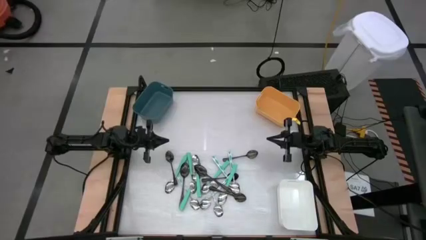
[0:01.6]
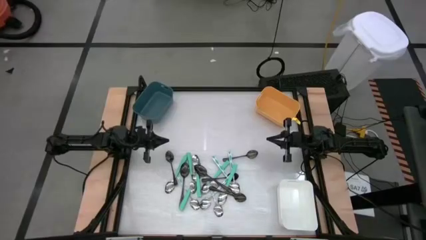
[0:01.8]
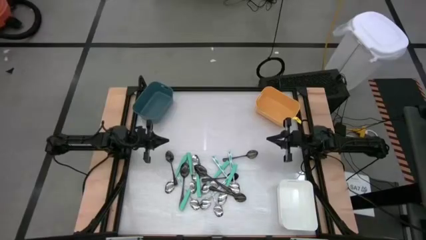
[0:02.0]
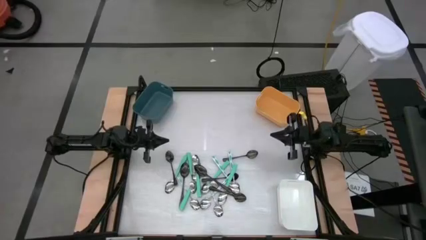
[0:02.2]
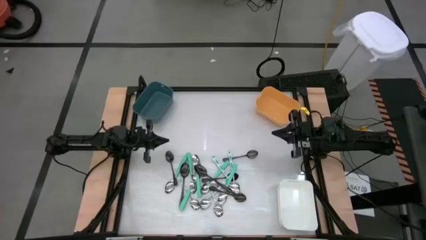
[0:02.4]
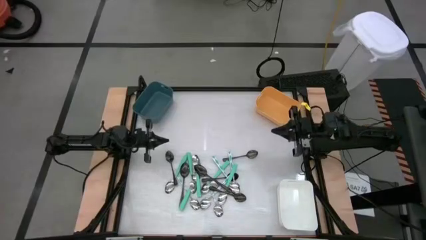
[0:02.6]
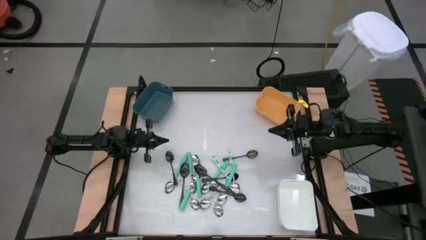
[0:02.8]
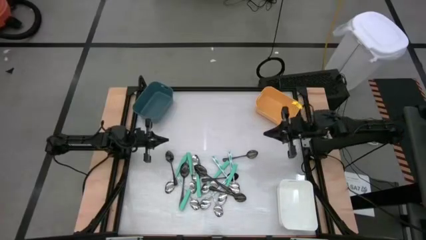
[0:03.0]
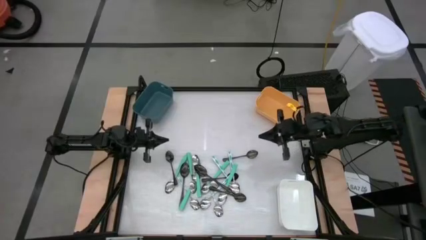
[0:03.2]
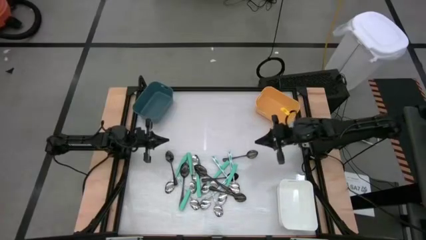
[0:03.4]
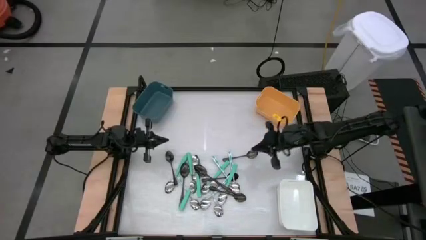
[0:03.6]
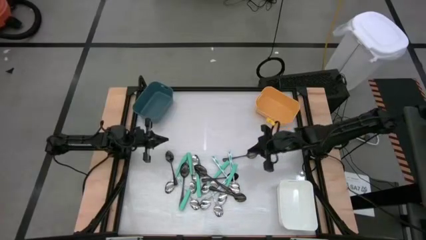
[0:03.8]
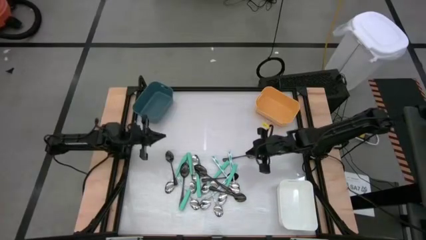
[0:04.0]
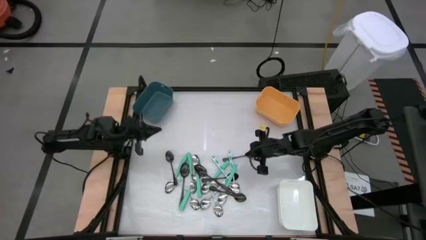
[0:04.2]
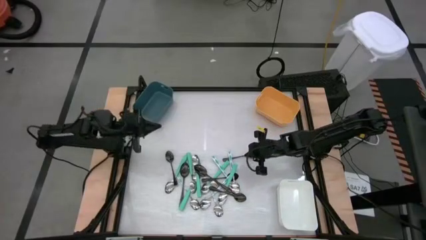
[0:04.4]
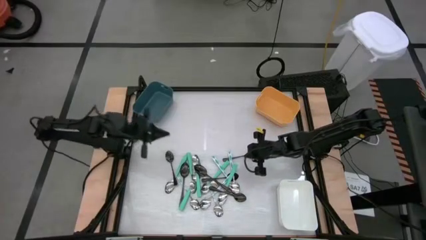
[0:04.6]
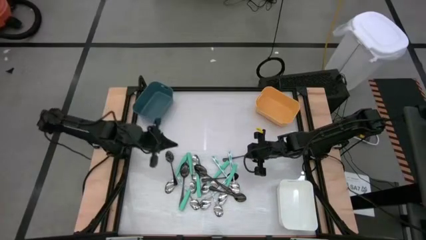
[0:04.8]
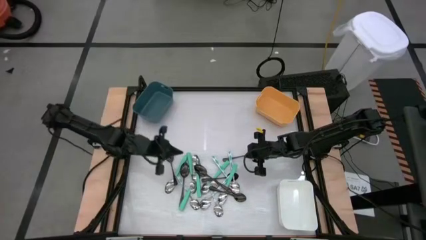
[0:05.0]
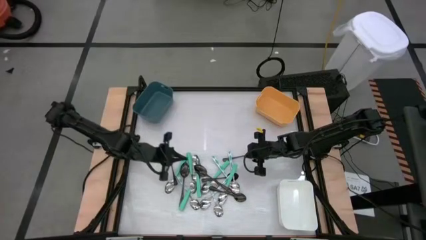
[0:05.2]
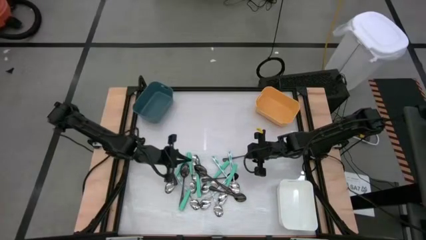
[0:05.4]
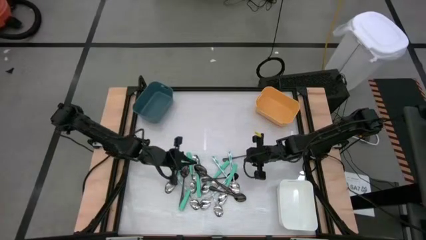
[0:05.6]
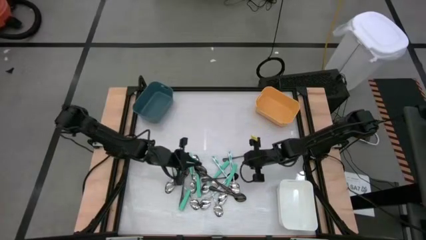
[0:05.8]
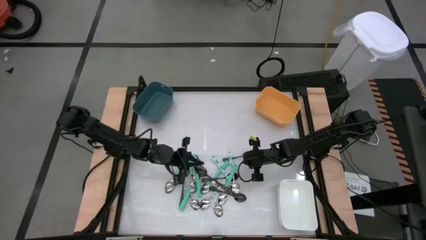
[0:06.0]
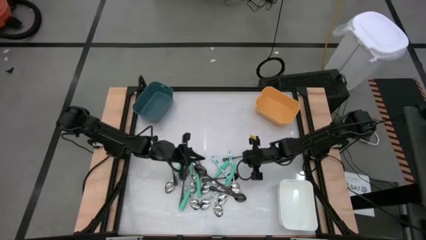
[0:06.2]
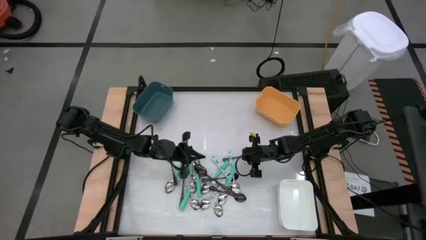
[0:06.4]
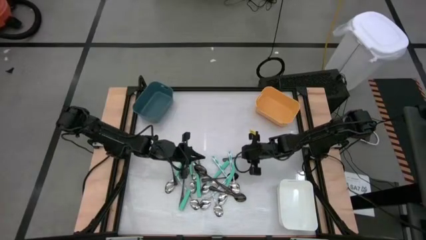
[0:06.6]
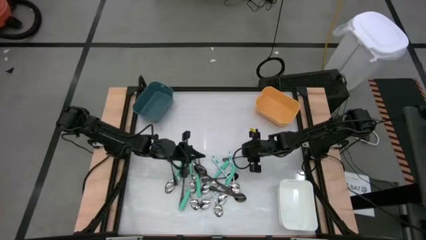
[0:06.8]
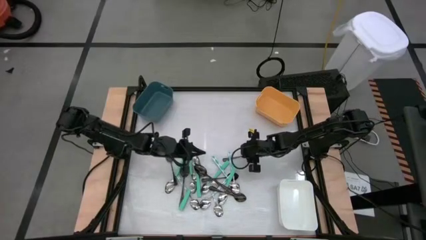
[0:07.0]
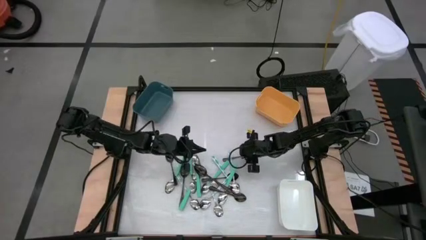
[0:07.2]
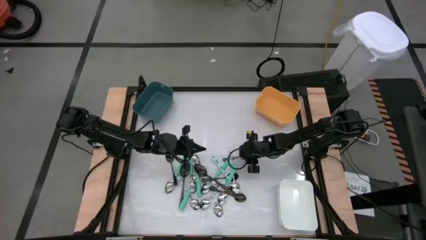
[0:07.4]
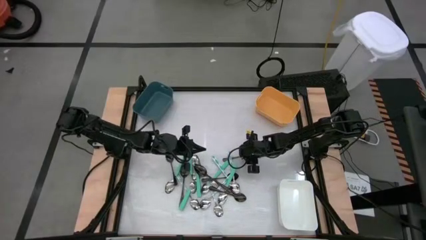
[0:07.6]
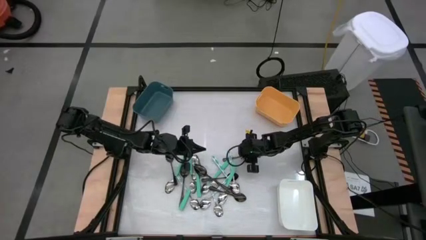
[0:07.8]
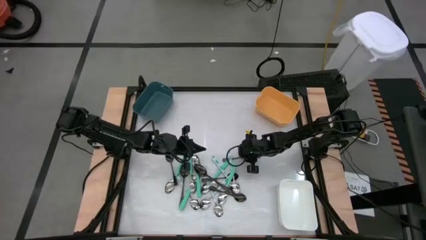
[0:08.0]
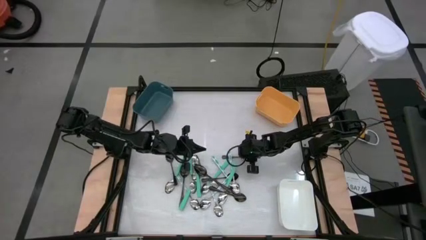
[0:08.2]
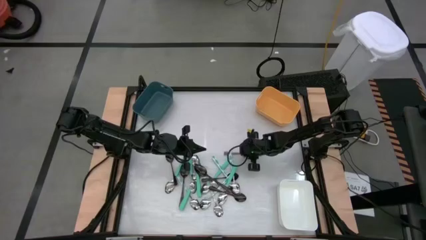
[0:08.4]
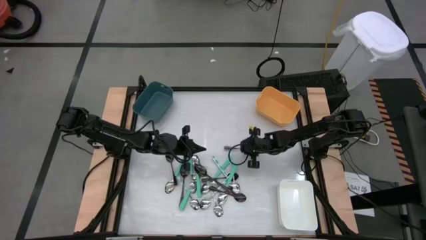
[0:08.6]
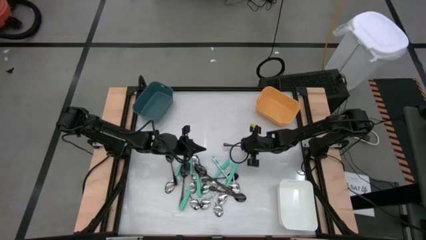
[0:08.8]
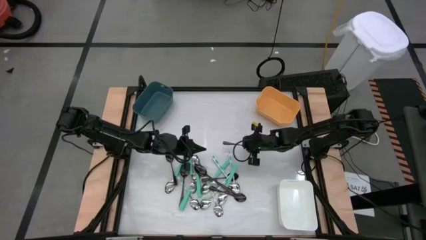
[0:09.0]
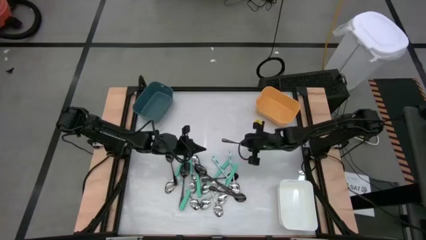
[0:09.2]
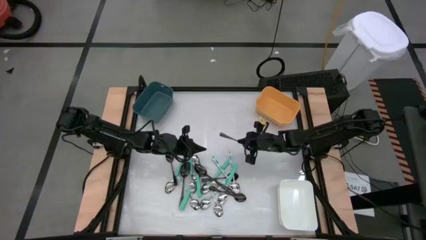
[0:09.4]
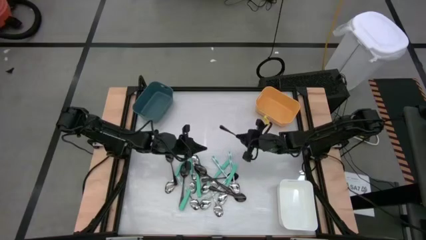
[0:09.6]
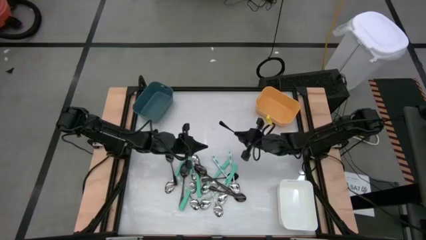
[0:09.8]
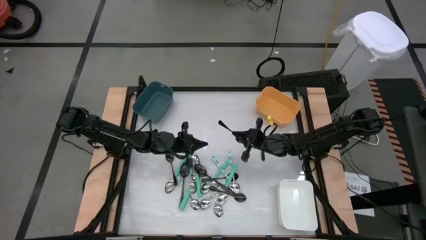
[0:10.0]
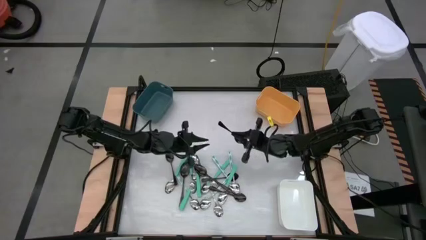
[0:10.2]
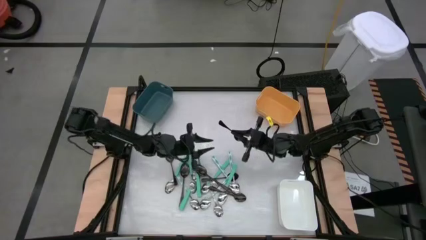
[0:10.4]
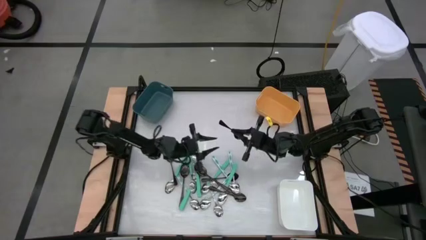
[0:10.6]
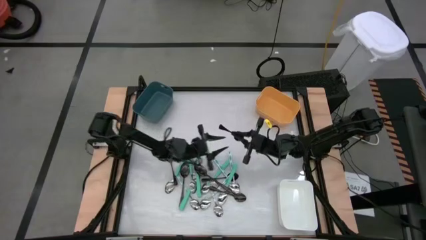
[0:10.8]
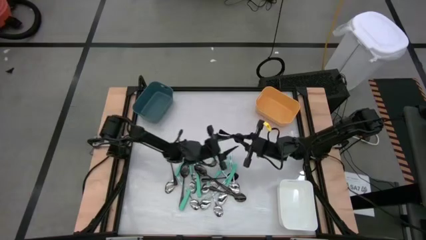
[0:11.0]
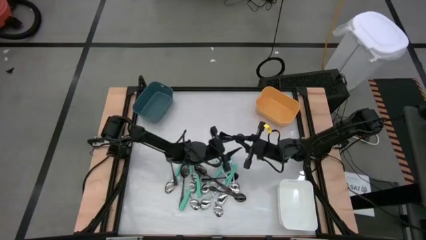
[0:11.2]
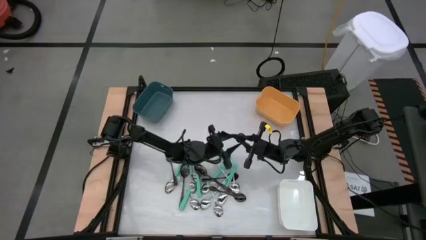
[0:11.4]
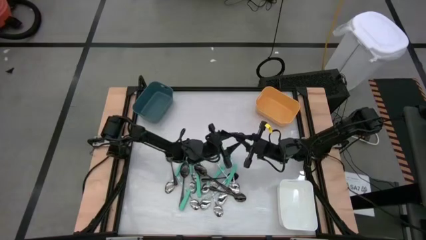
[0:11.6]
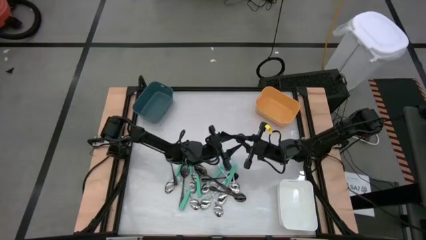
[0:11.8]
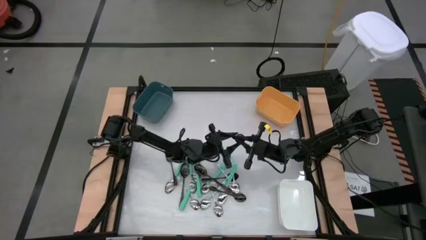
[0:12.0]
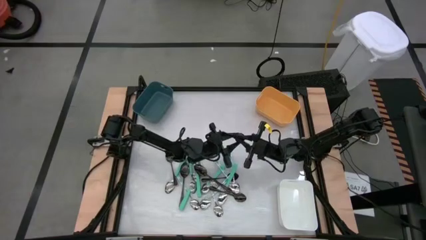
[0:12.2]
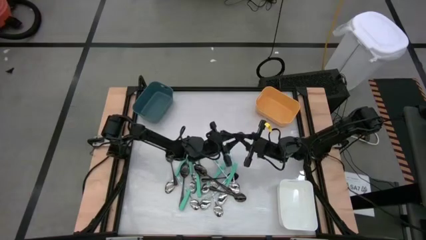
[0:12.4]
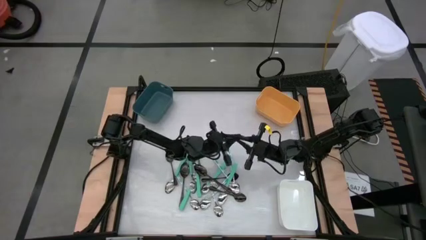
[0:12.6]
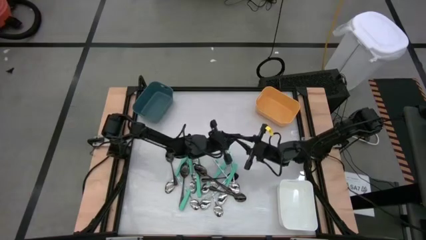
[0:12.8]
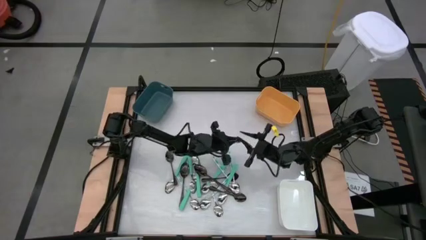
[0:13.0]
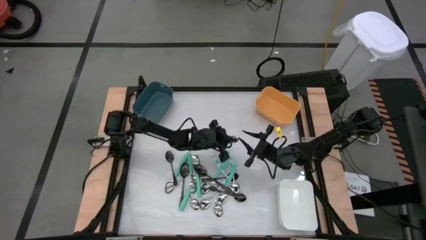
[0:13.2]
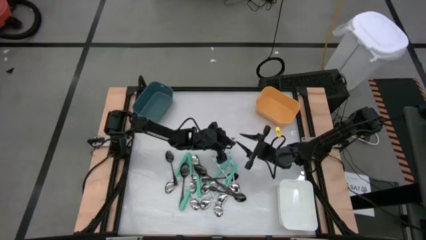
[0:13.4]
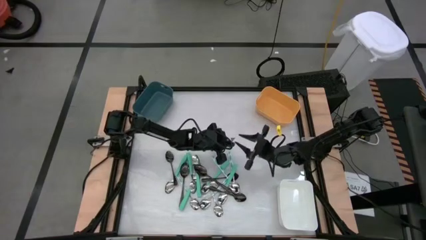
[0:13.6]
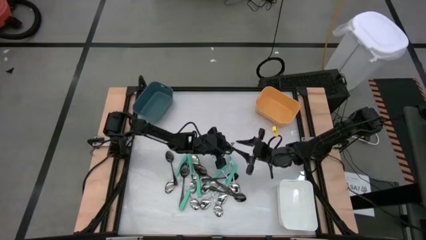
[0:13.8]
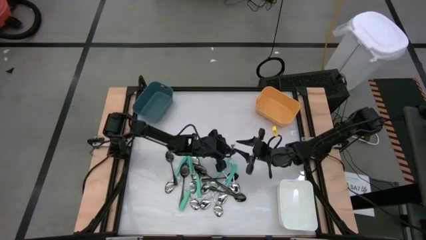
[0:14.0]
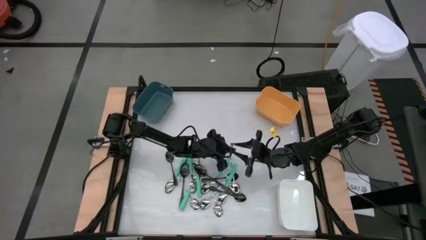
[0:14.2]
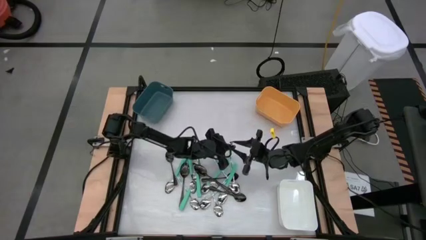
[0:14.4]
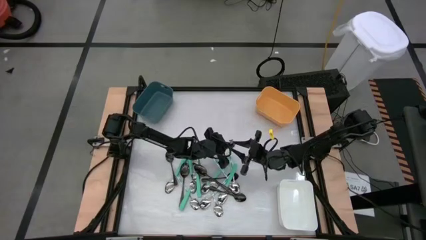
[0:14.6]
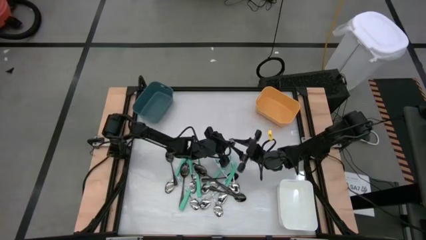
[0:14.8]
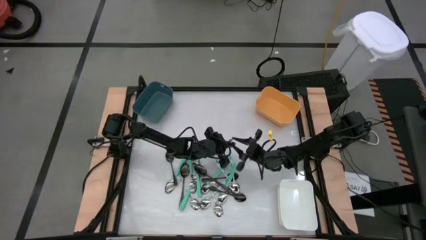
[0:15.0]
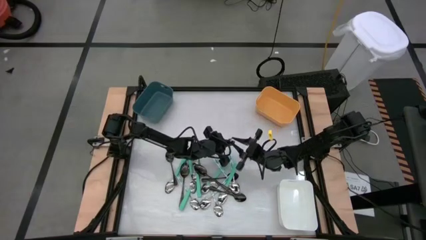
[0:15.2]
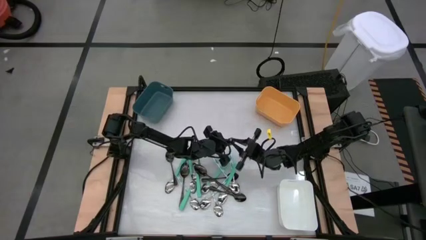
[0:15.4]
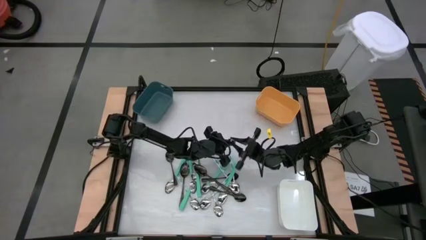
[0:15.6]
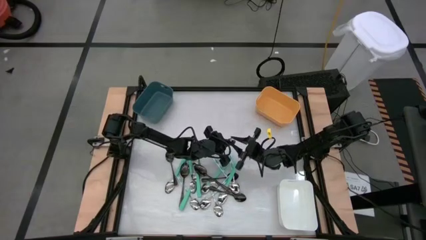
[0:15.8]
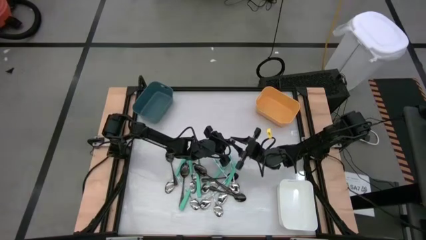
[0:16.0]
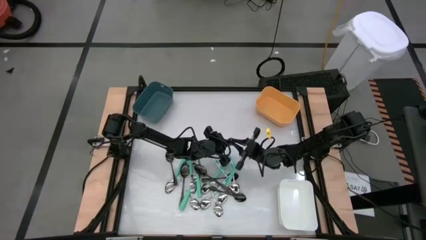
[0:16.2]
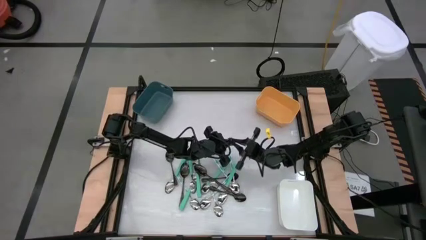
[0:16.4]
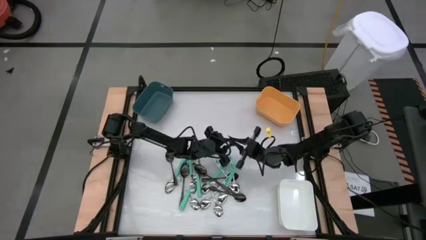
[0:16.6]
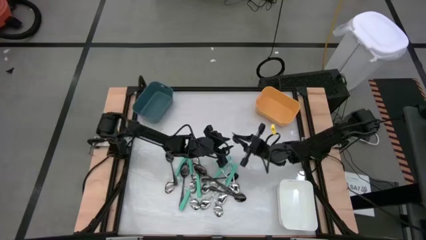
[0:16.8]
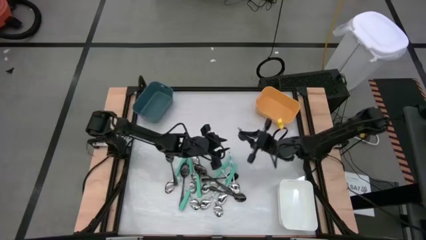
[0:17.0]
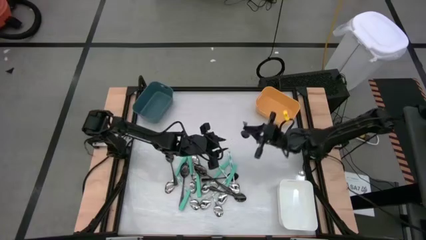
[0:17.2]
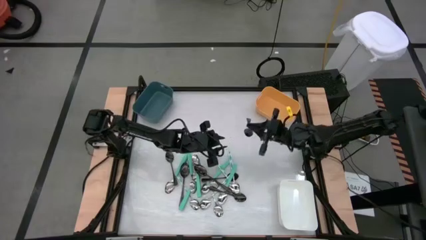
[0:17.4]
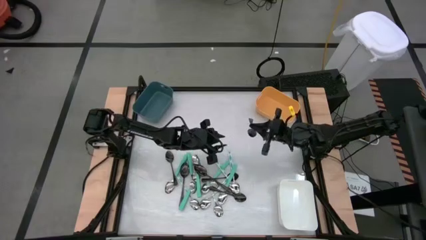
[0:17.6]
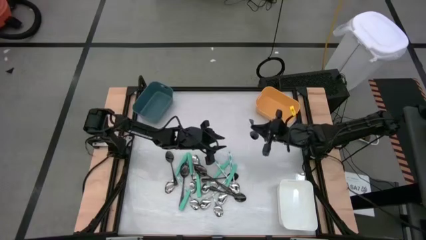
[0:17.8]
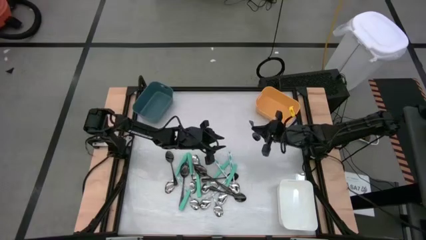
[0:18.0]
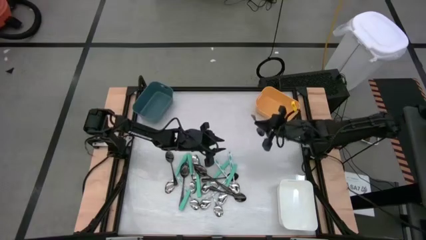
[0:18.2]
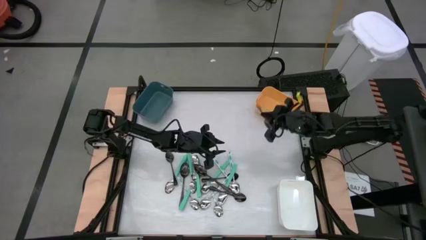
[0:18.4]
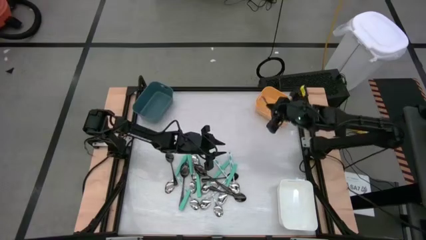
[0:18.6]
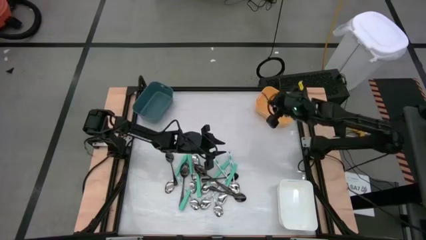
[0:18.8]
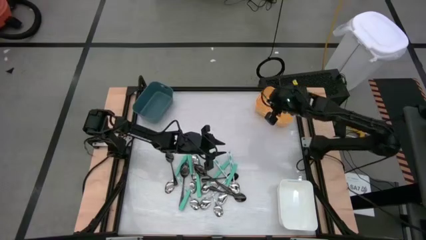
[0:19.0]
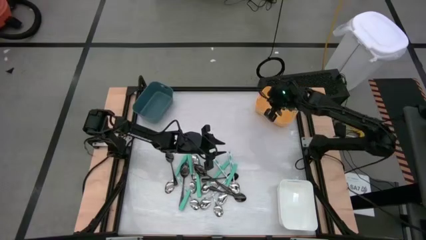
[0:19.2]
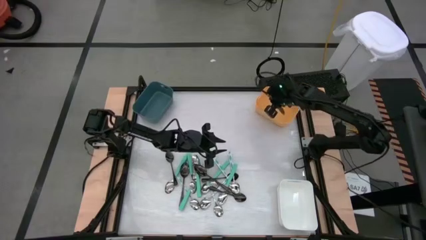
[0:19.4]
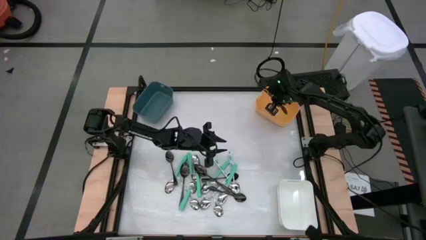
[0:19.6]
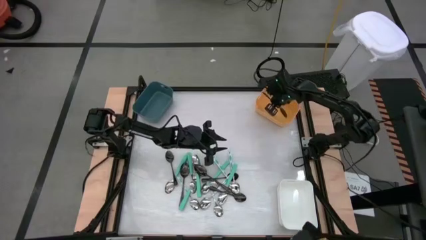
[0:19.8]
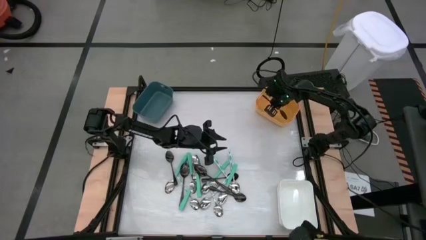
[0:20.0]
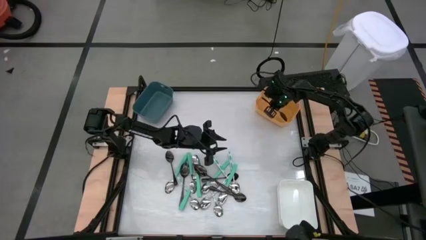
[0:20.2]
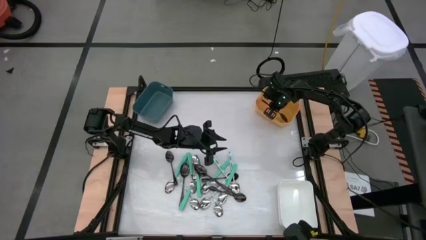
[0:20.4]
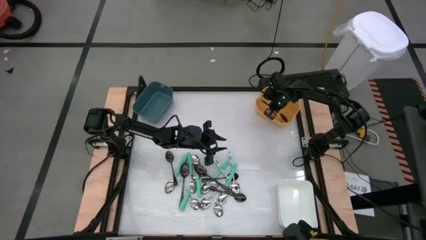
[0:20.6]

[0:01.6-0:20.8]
Task: Sort silverware by color (type)
Put the black spoon into the yellow bin
